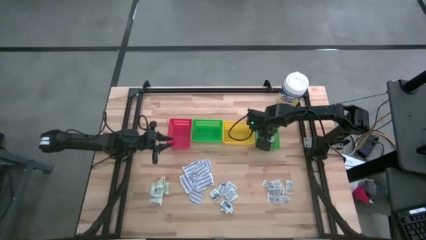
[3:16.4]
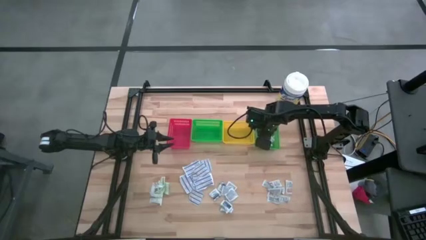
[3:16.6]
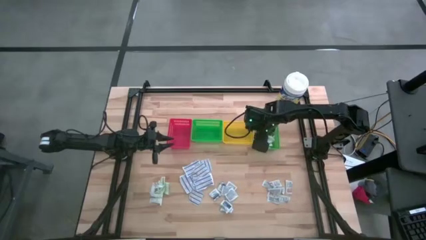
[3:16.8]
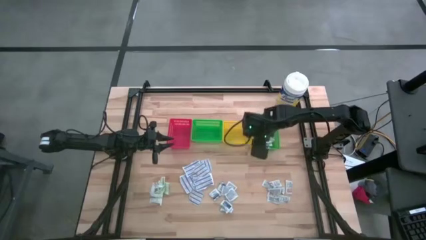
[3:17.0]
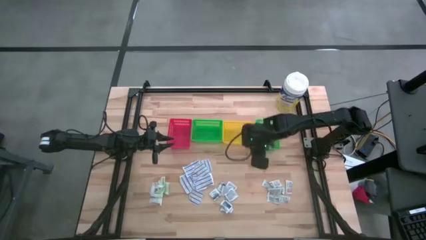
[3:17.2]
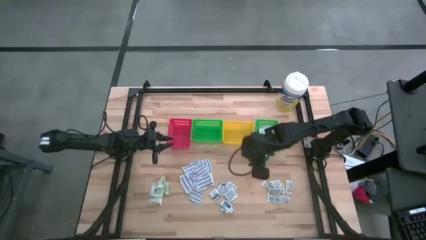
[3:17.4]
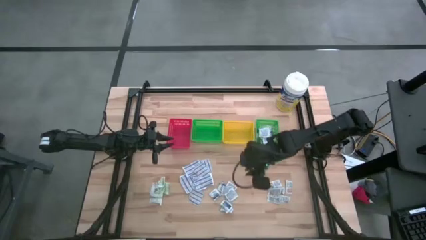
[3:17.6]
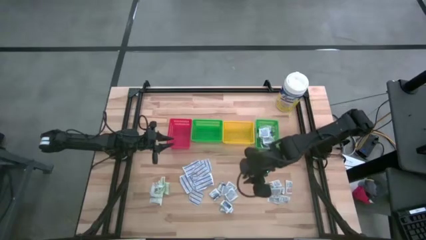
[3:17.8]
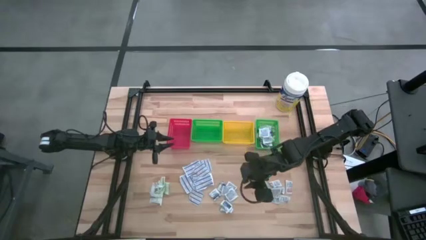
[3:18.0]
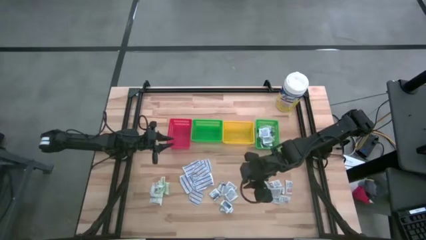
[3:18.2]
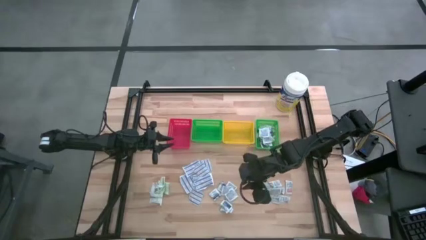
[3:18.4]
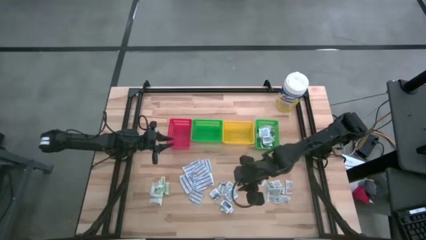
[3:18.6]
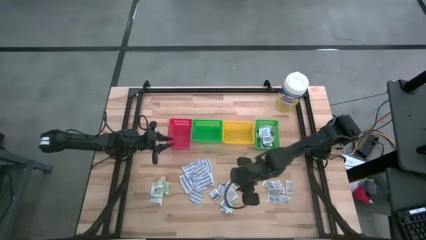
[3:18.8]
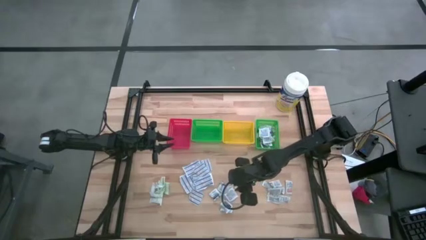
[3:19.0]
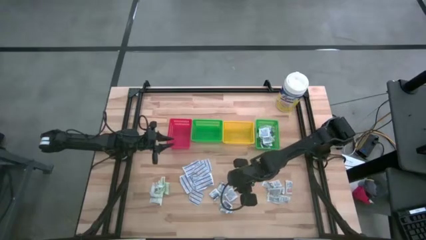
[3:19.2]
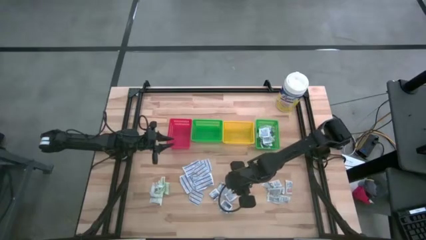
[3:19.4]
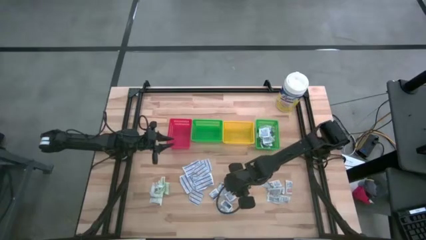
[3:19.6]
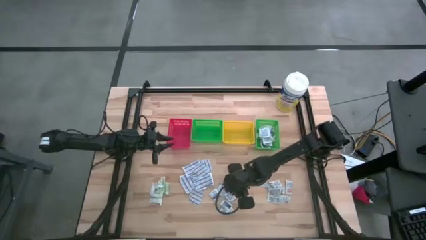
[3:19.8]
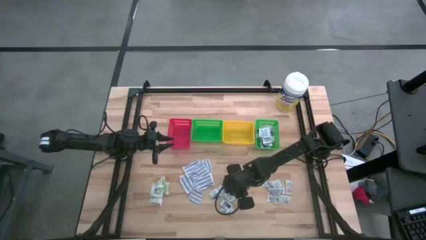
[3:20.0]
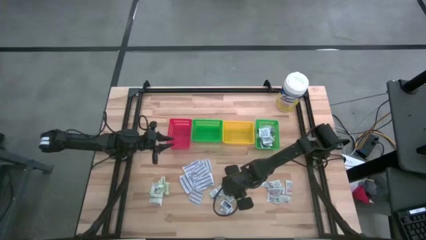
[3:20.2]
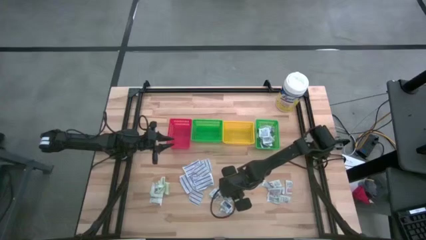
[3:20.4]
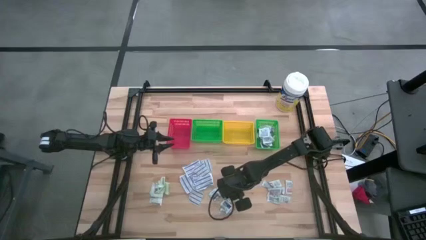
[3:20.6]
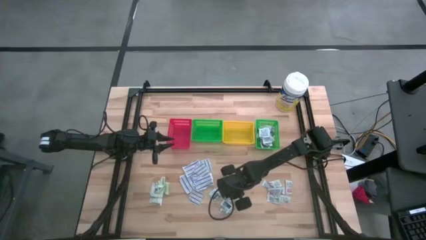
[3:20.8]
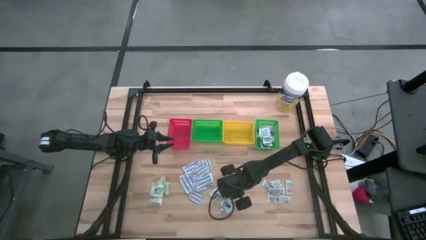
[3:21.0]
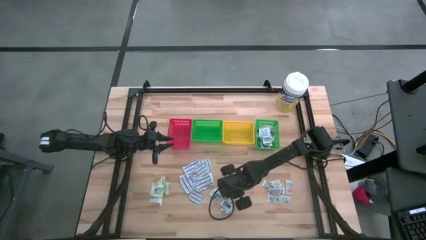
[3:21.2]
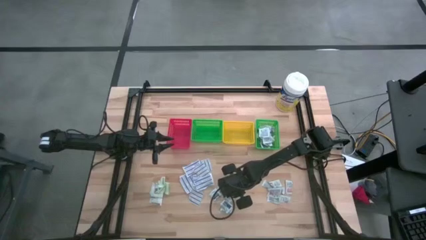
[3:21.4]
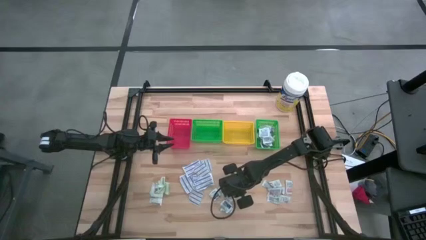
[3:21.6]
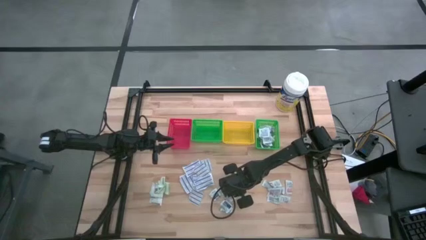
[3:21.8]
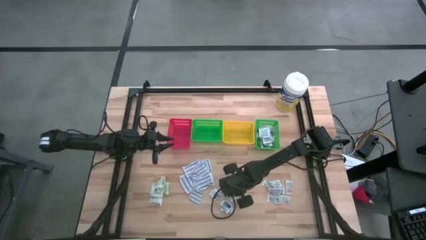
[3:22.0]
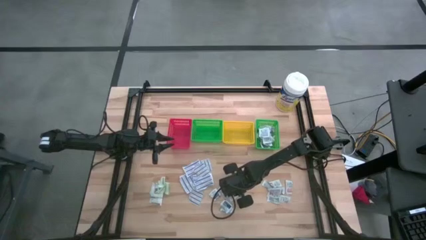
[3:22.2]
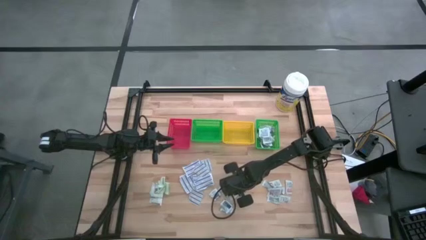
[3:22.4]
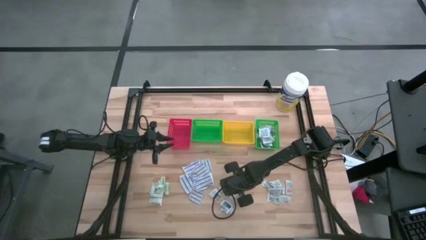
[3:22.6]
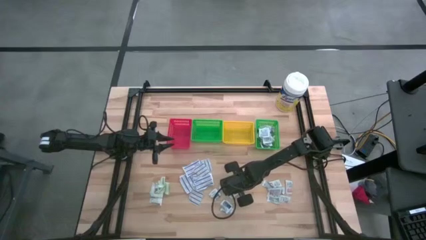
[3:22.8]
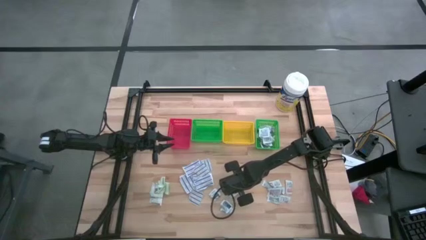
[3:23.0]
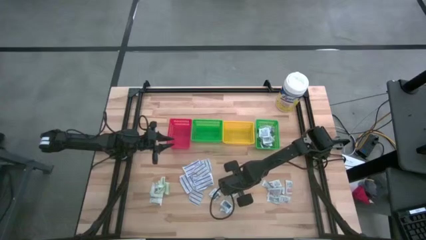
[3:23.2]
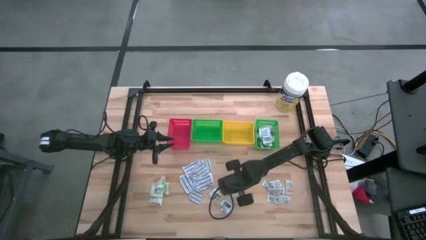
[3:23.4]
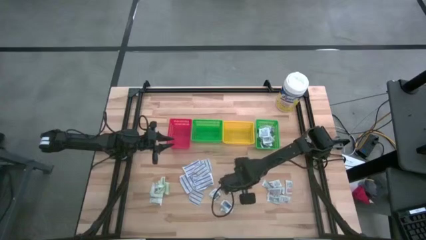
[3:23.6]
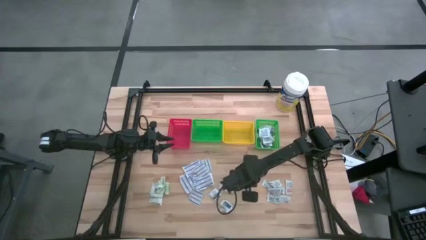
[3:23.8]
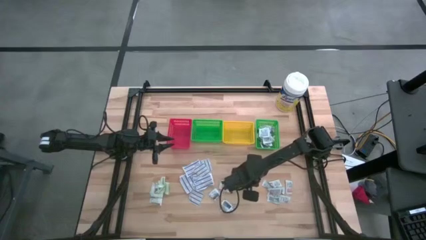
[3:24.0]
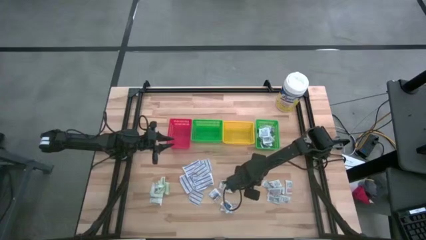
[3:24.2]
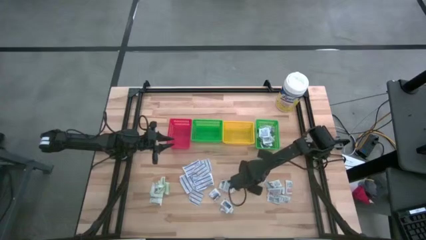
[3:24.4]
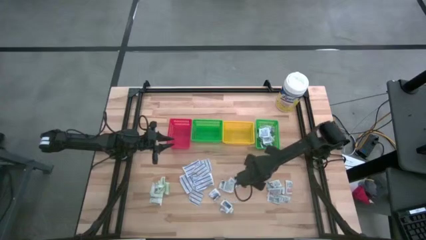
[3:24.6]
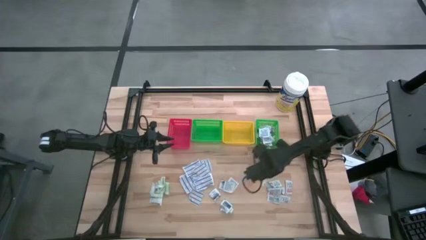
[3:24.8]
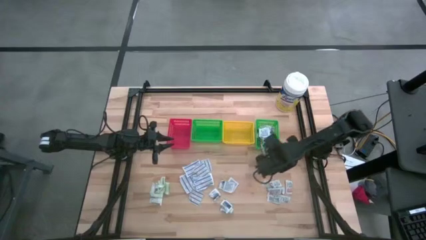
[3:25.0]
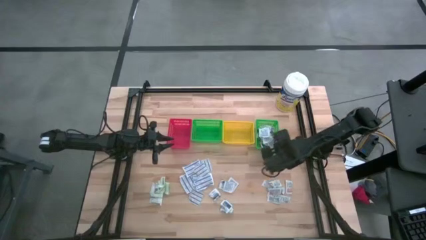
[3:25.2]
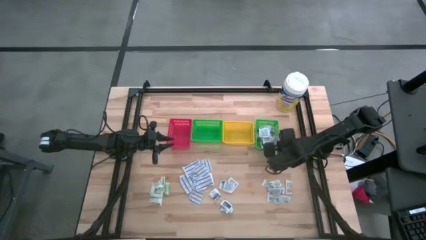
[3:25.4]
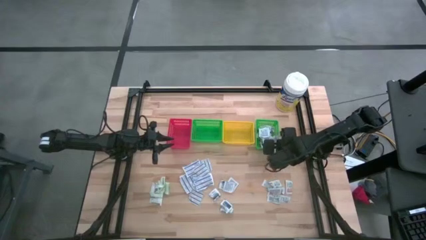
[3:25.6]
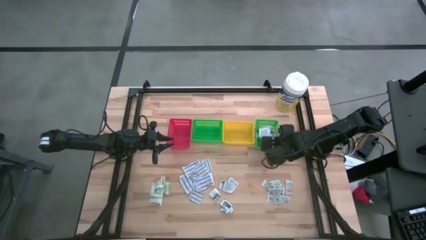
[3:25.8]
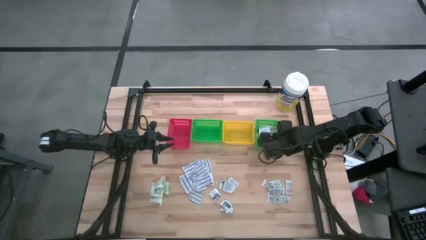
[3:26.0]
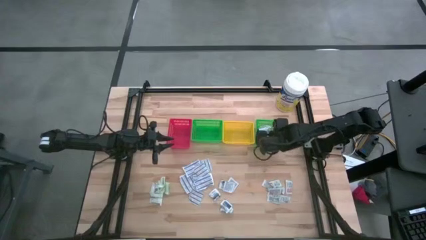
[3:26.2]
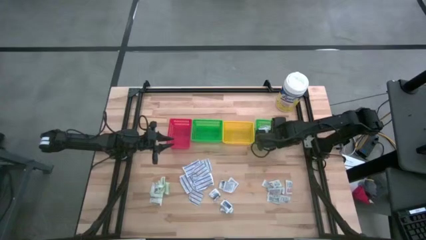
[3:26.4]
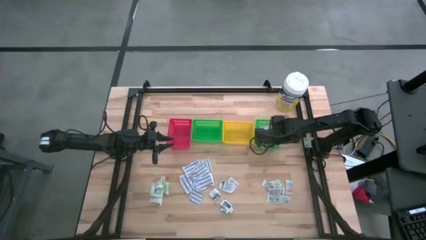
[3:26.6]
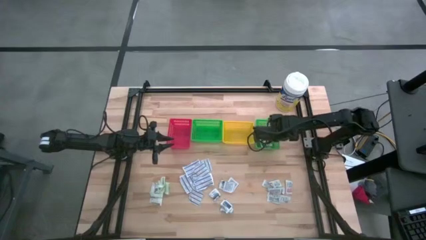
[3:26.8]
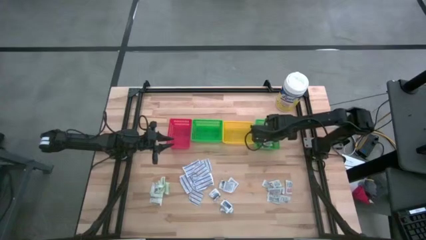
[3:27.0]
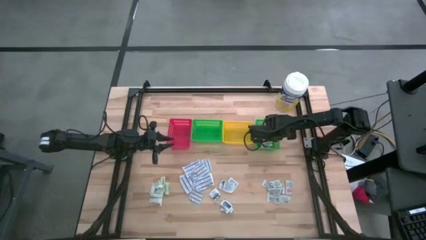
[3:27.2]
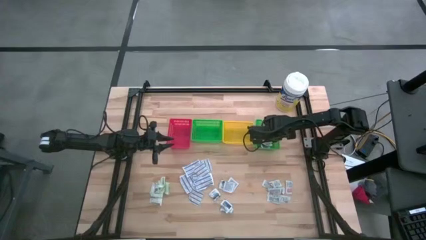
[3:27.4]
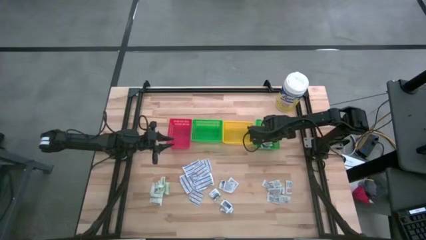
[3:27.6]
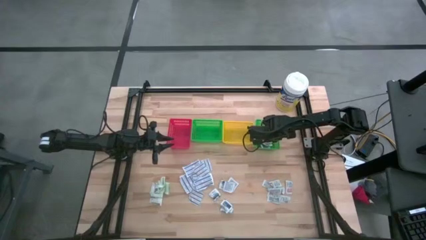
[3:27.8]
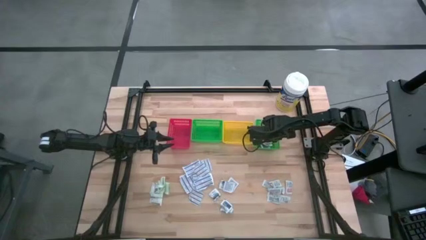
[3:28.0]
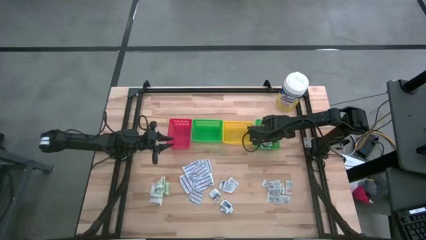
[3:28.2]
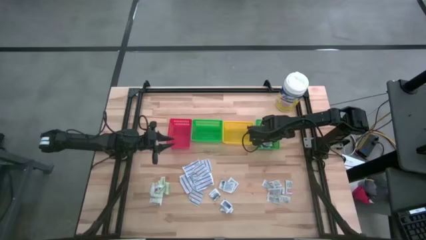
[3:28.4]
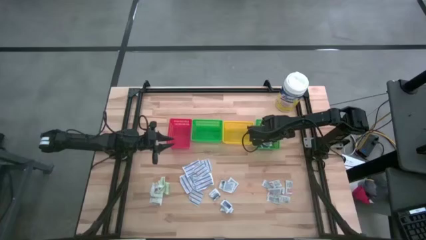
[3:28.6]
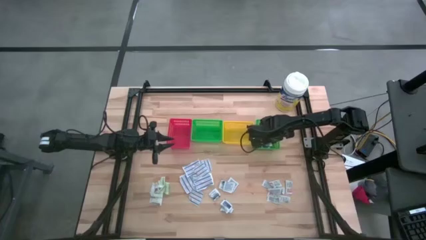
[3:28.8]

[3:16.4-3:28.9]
Task: Pick & Place First Aid Supplies
Put the blue alcohol pad into the right green bin

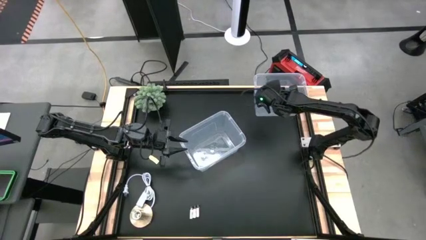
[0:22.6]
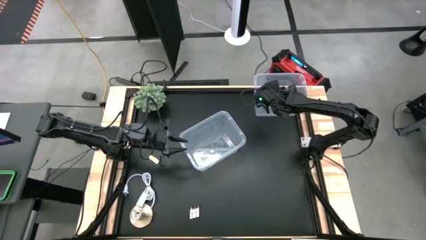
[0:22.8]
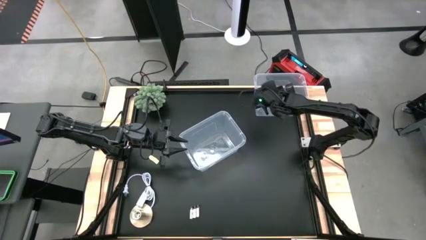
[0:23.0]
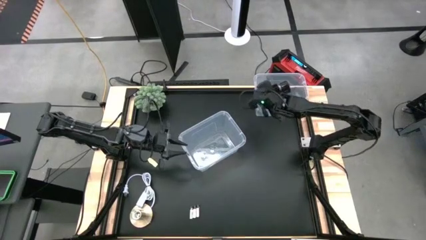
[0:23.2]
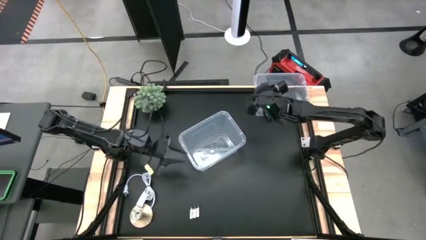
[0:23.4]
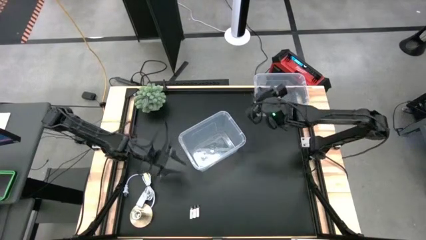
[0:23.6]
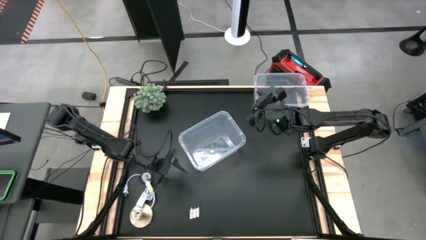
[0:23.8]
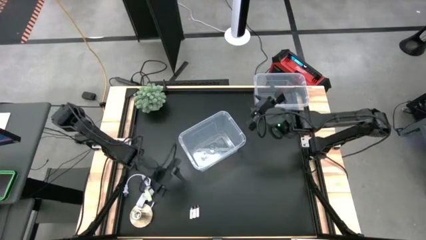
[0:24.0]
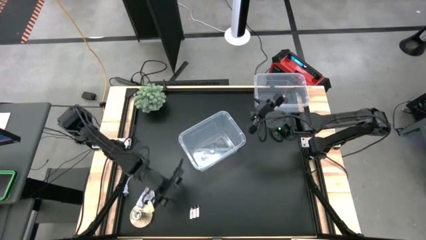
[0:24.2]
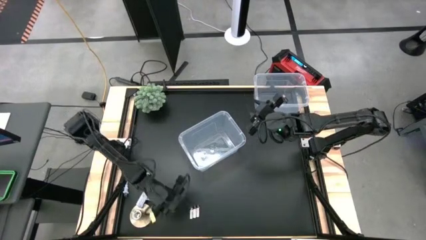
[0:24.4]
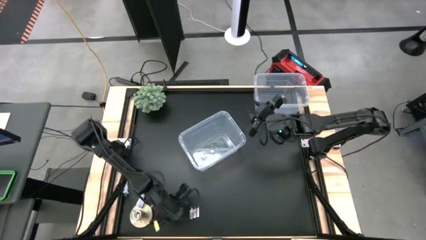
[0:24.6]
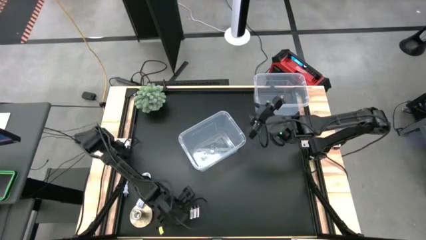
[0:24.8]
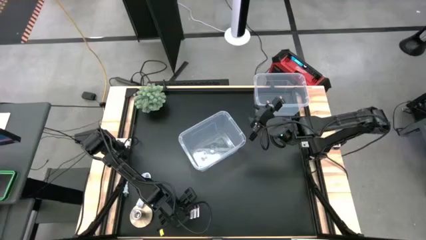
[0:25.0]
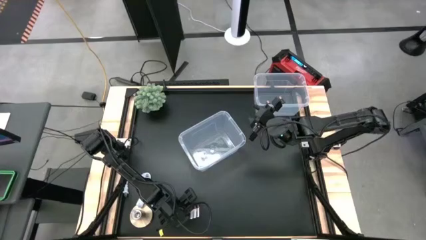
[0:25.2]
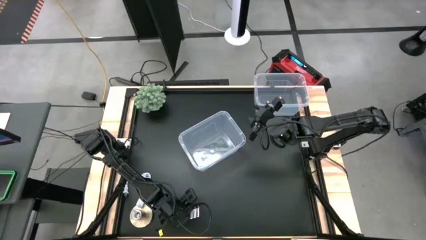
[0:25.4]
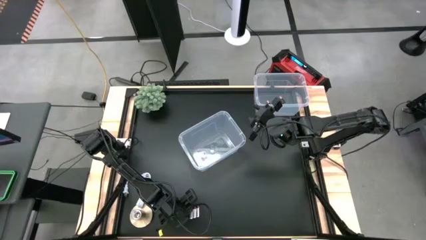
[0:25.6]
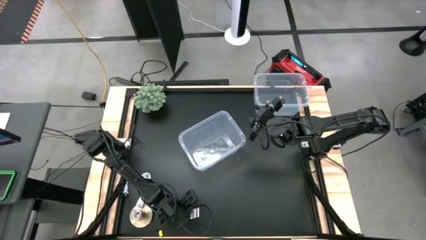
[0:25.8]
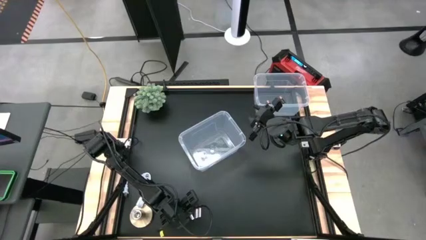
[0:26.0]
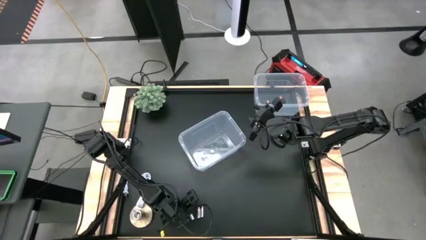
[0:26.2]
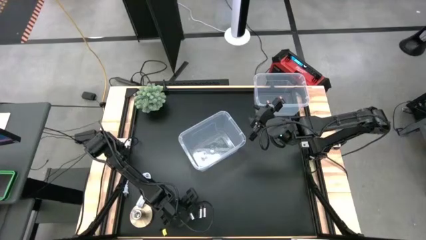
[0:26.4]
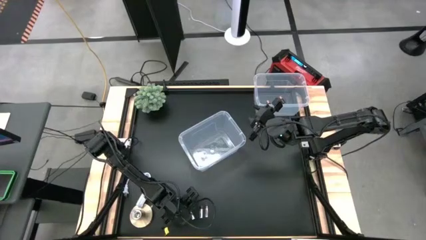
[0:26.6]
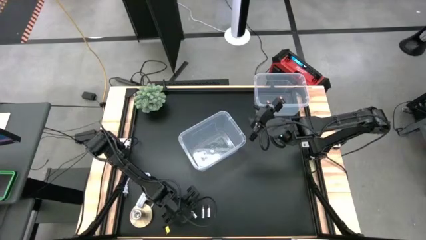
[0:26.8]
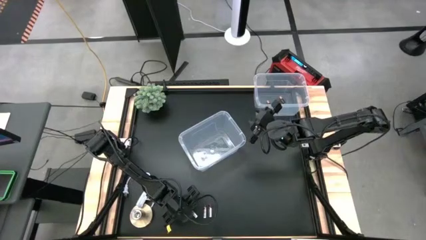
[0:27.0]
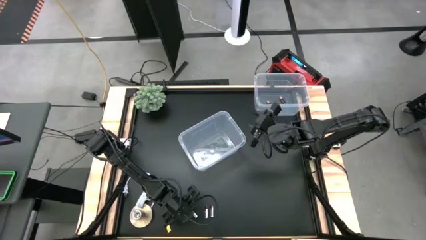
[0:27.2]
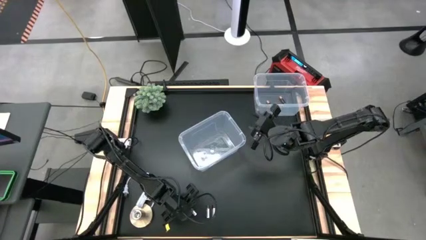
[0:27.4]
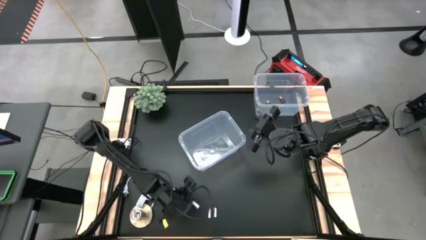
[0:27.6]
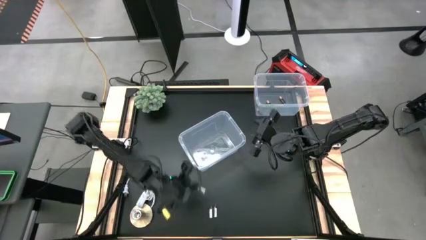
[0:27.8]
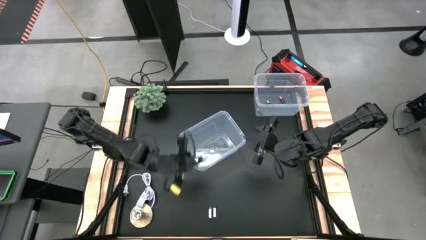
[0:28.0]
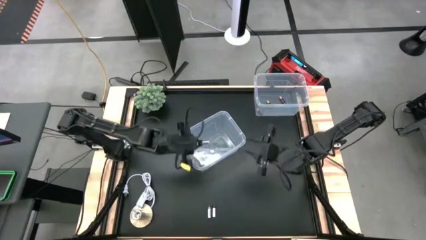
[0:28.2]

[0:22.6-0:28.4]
Task: Sort batteries
Put the left silver battery into the bottom transparent bin
